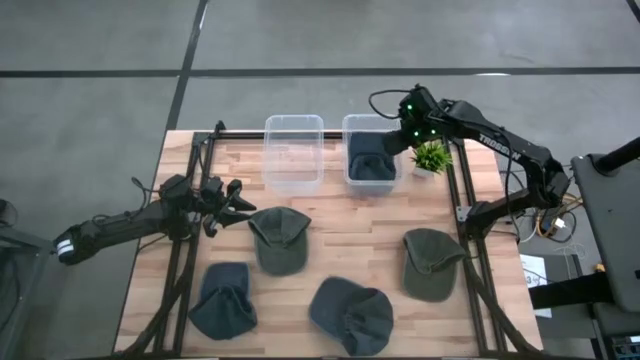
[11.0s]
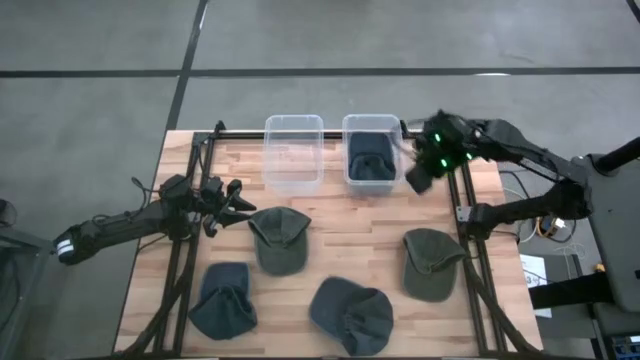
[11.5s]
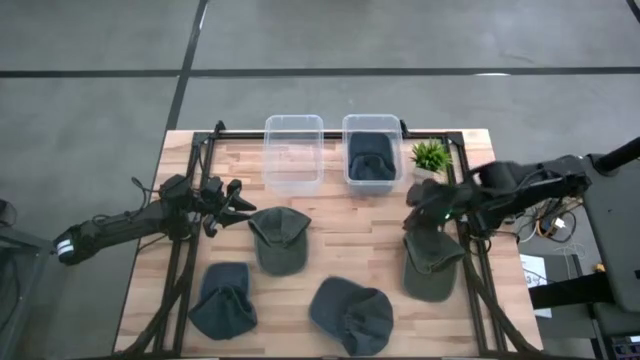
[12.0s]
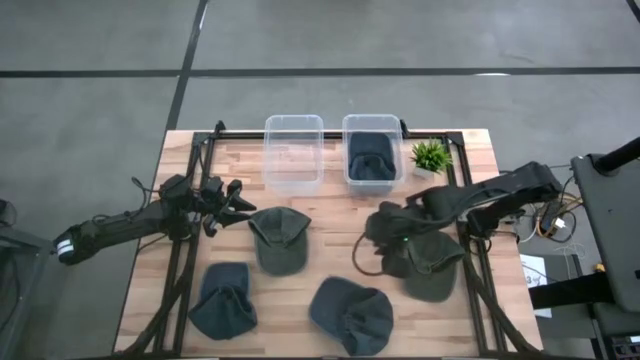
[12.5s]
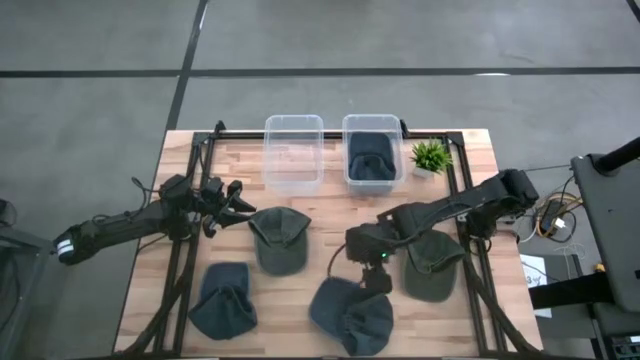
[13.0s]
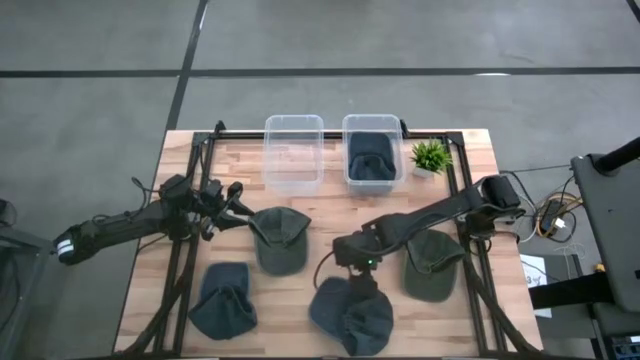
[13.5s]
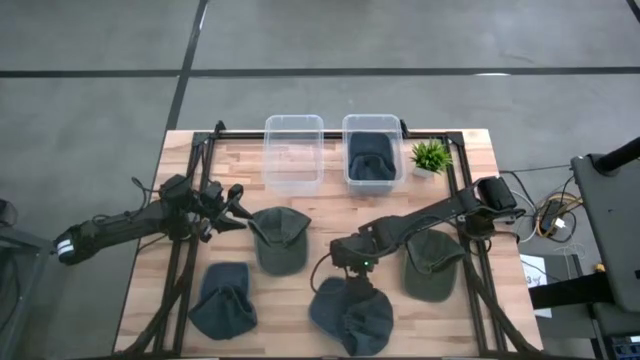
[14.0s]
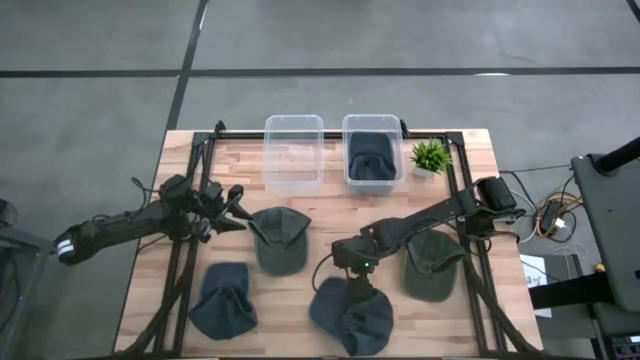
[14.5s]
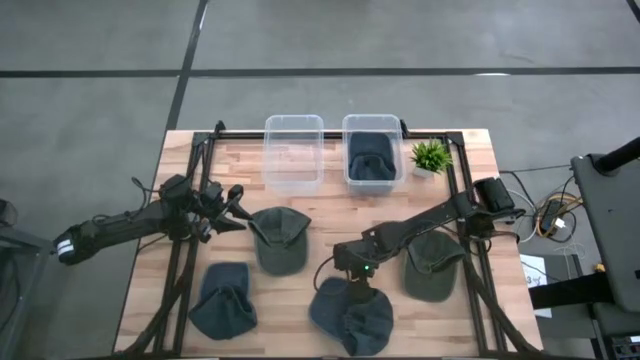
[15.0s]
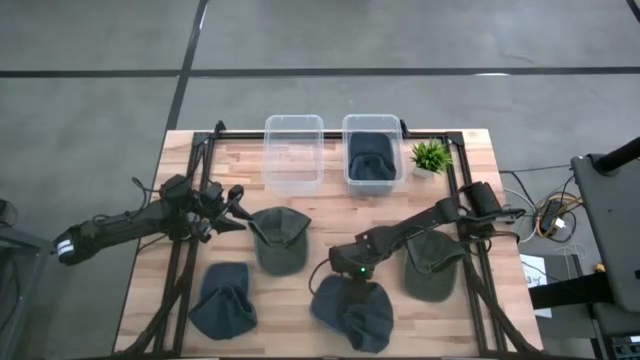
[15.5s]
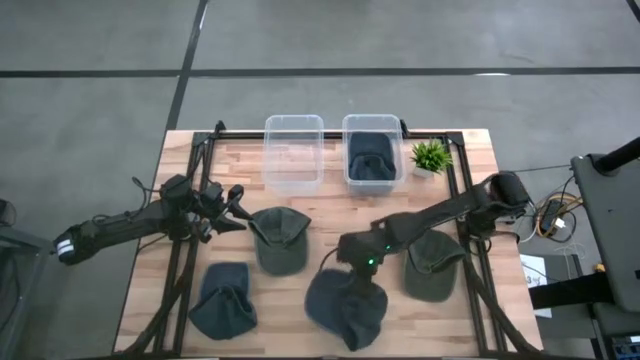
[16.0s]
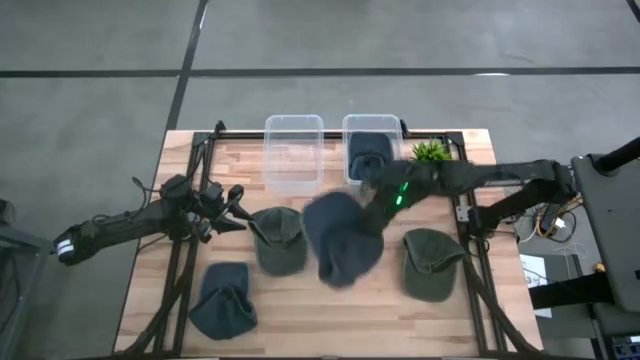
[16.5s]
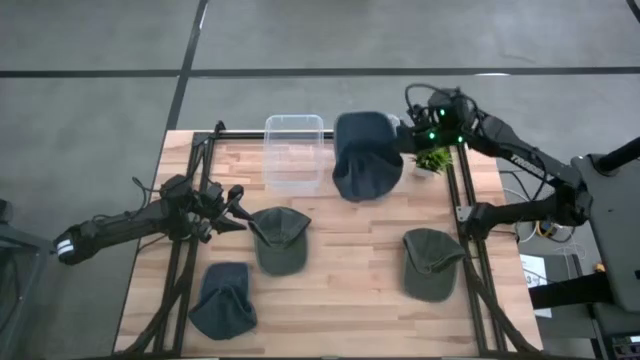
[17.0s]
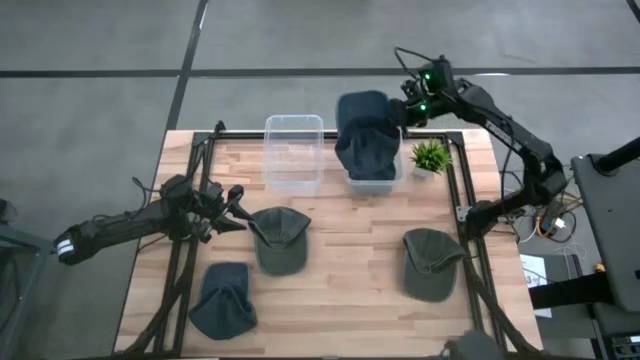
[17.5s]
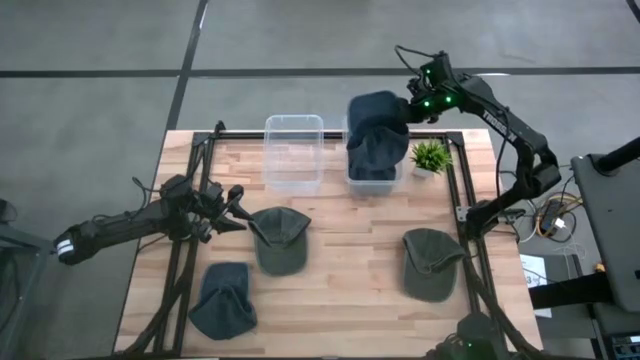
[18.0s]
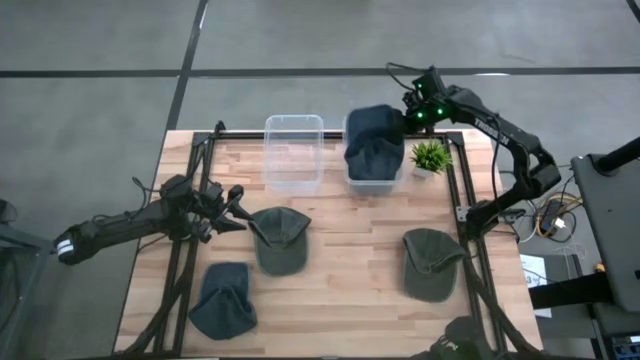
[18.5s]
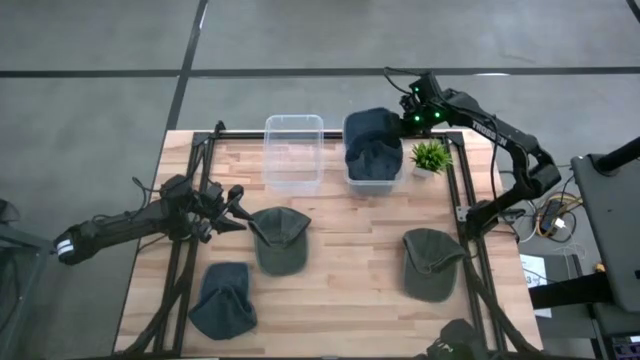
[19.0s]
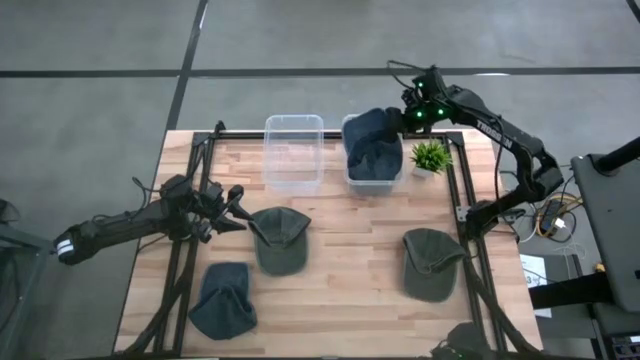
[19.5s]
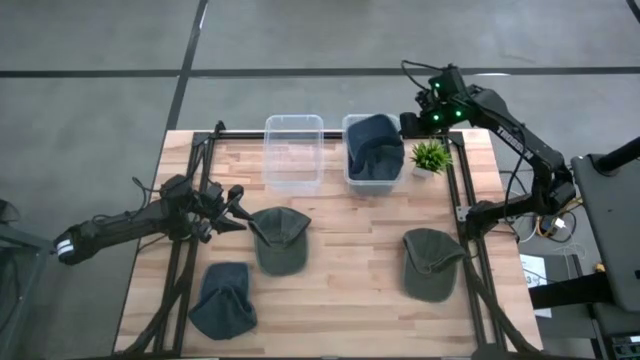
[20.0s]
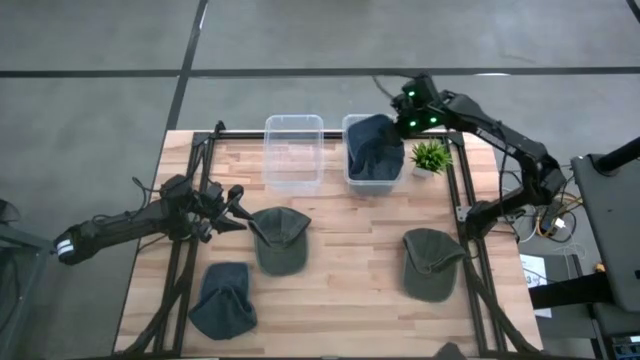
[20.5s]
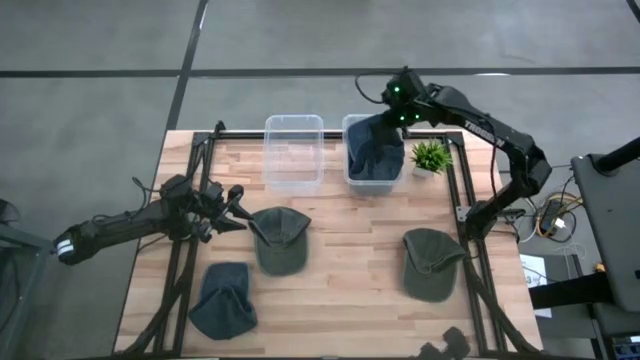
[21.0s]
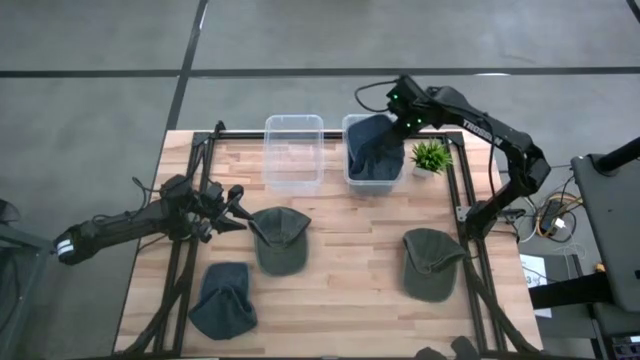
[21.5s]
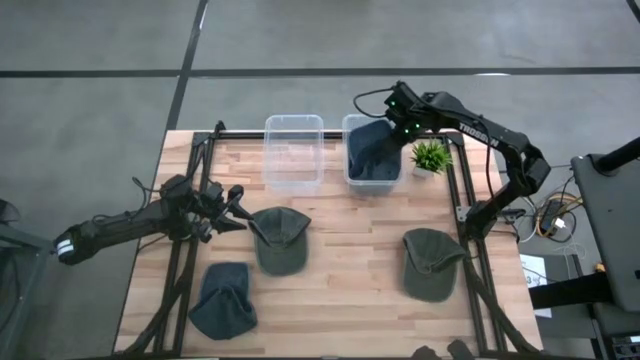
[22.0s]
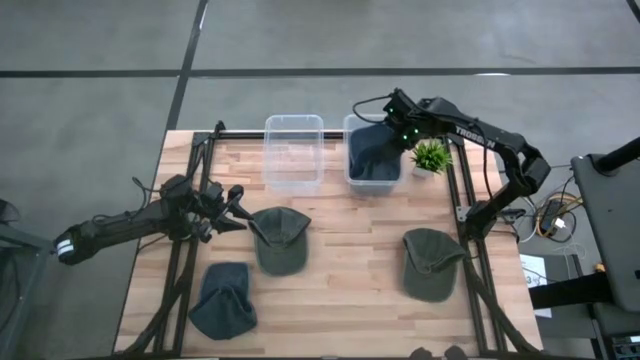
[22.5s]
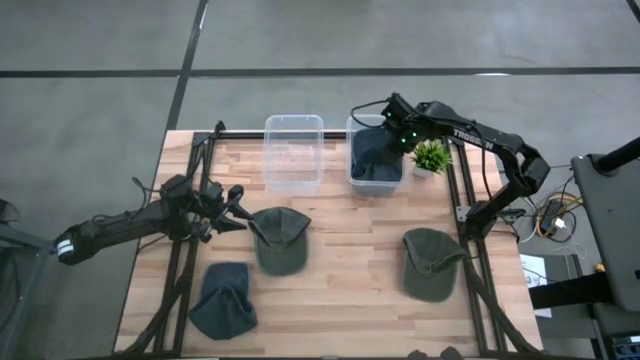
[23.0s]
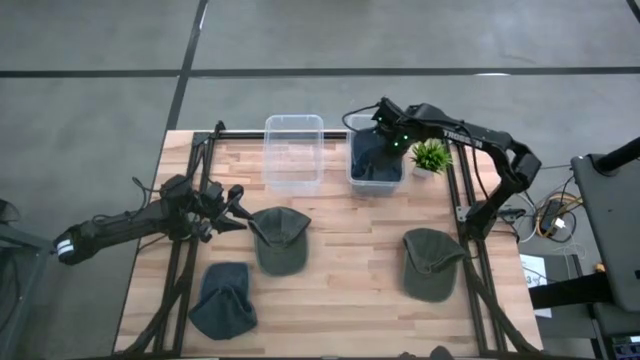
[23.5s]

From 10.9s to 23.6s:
Task: Pick & Place hat
Put the right blue cap into the right transparent bin
